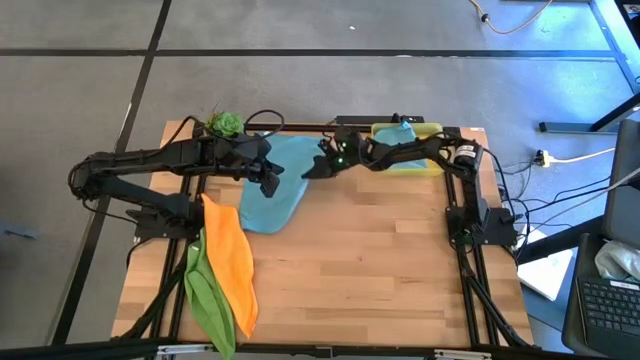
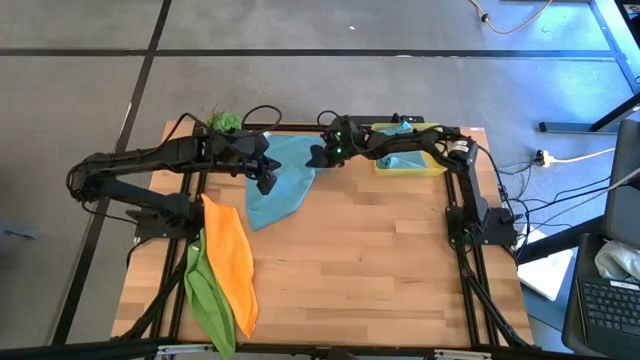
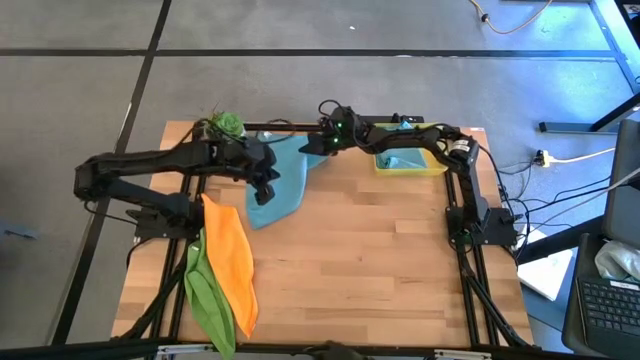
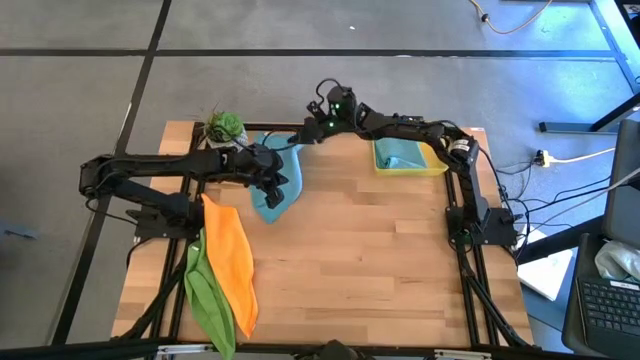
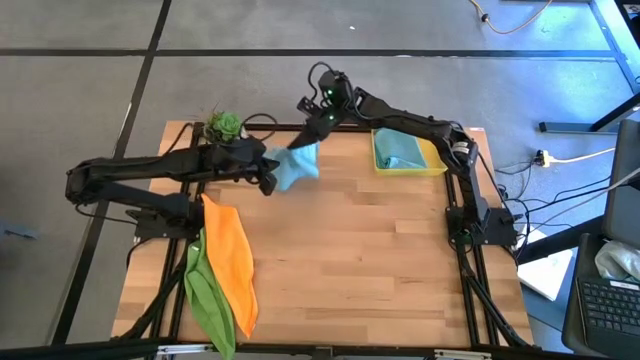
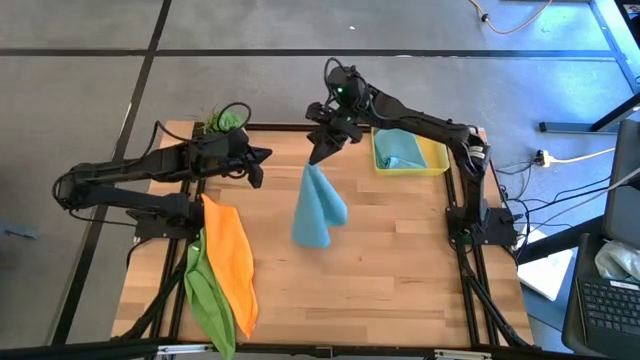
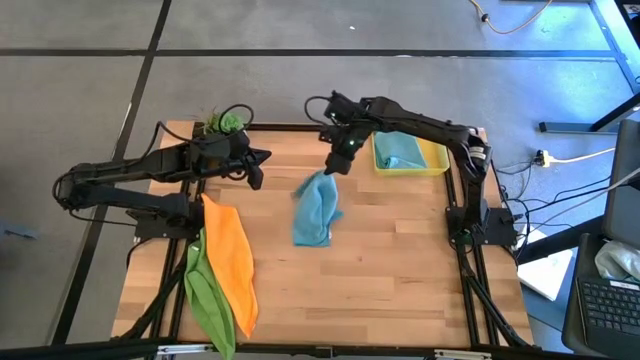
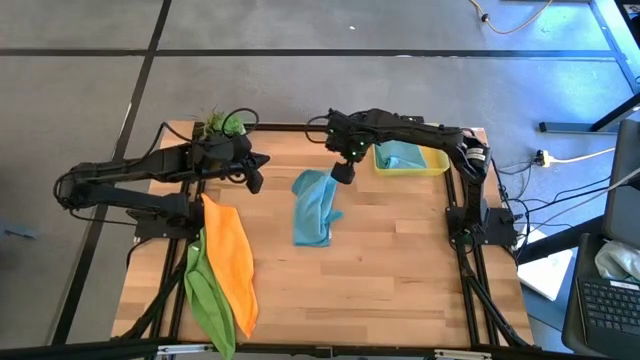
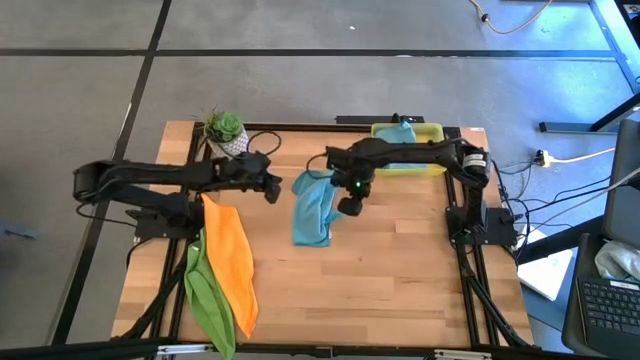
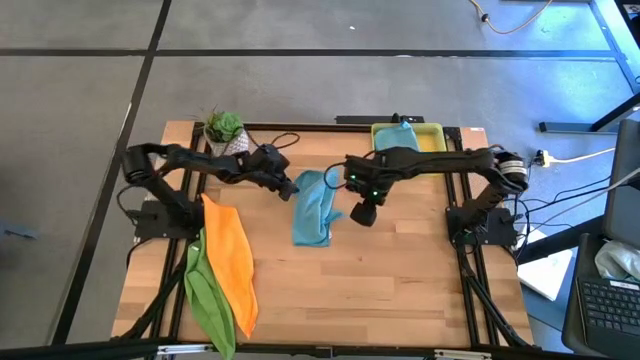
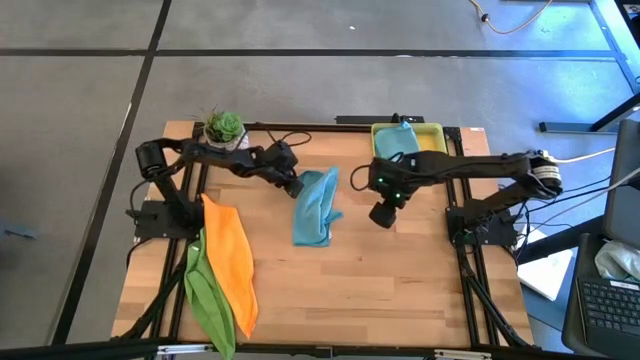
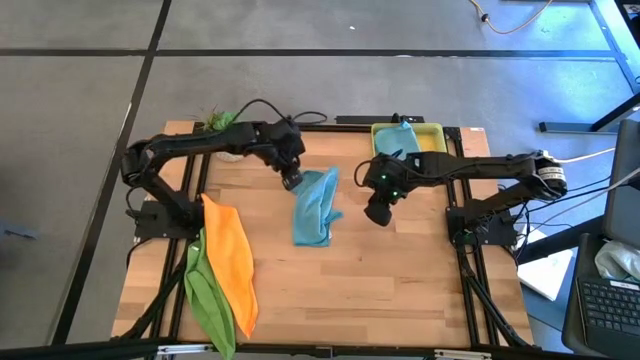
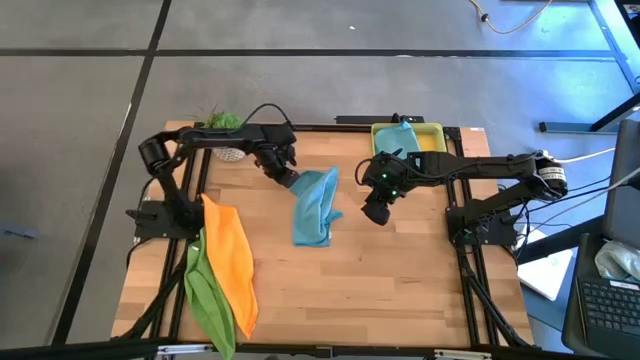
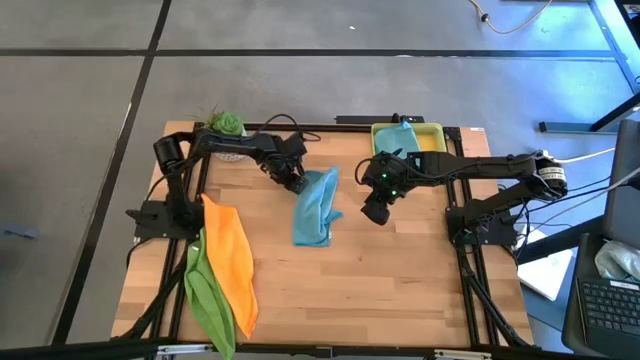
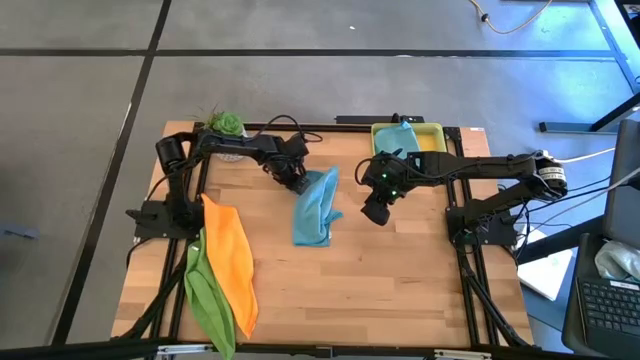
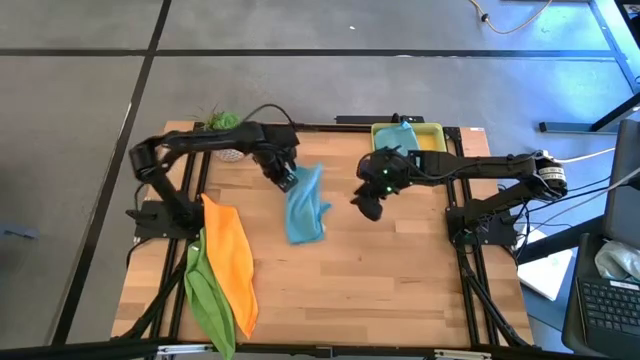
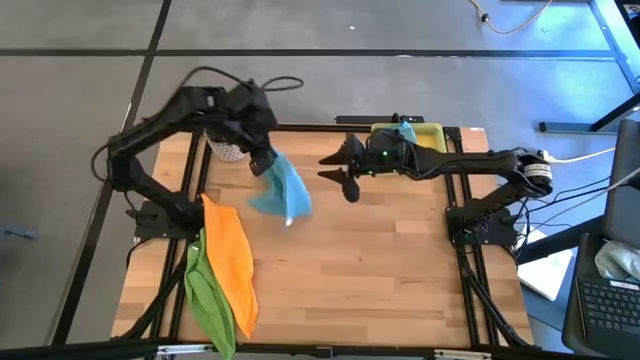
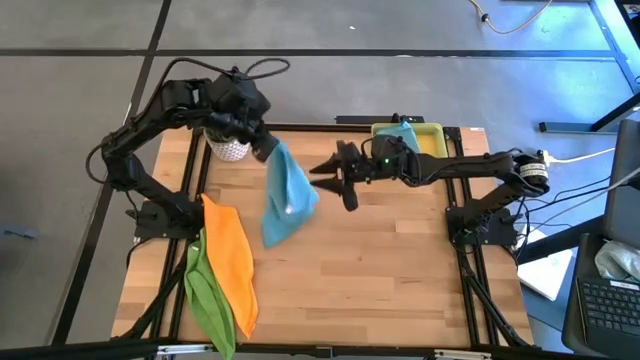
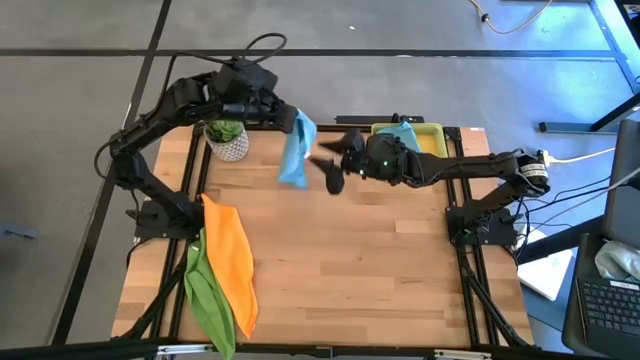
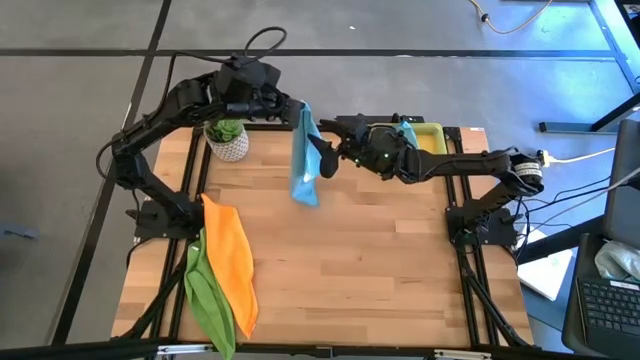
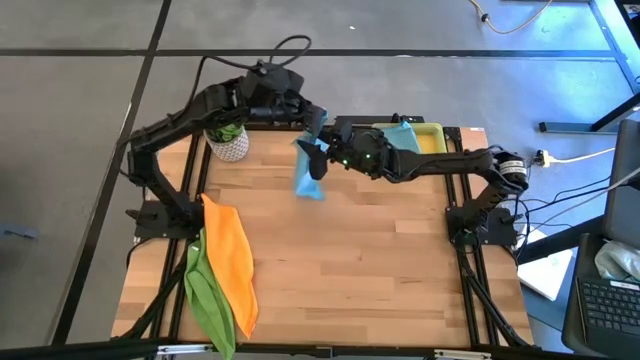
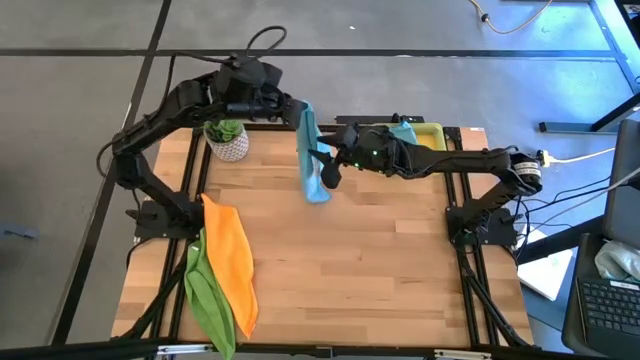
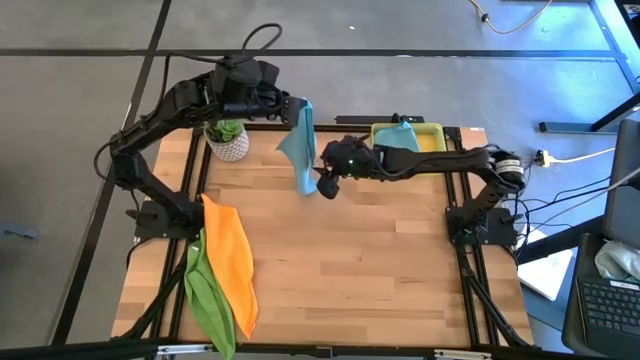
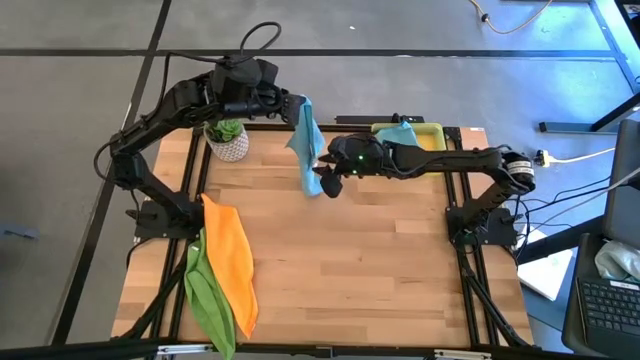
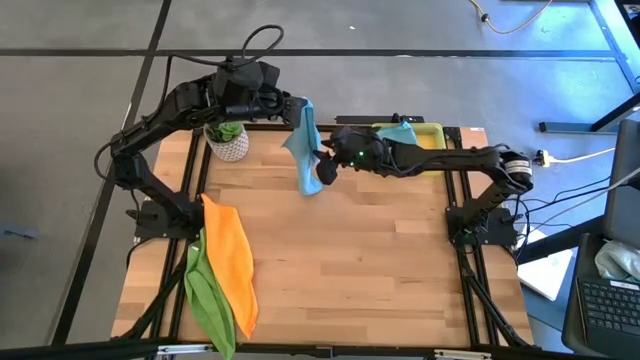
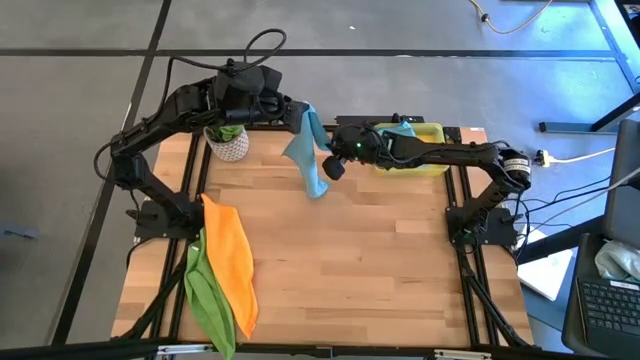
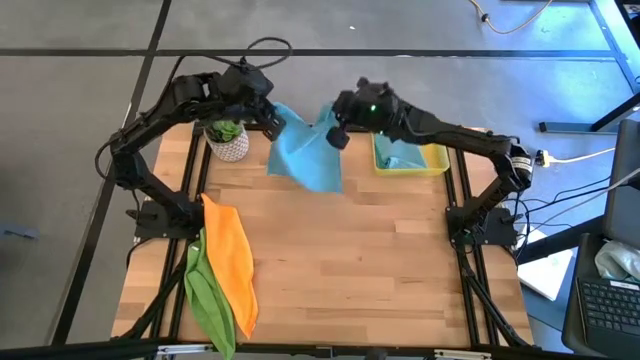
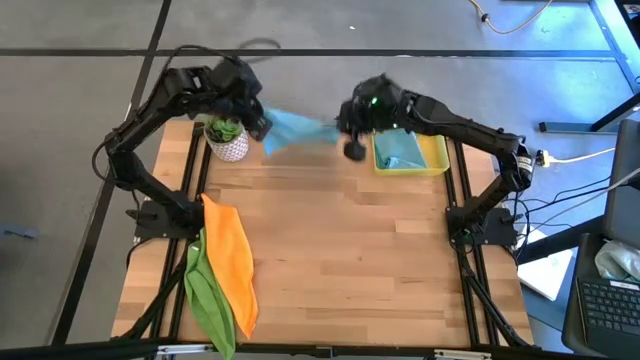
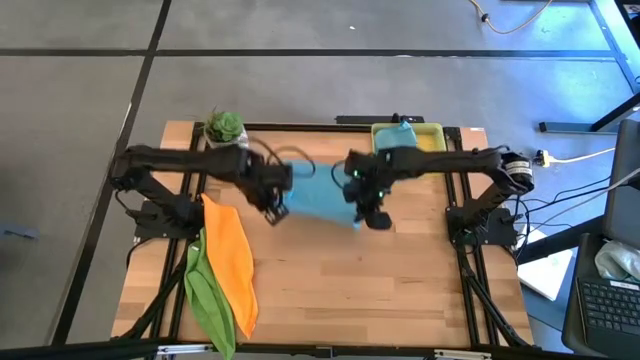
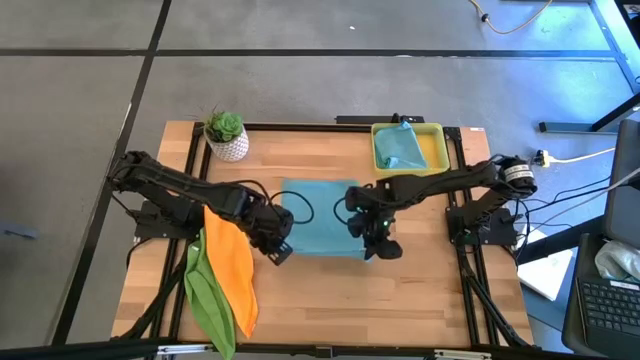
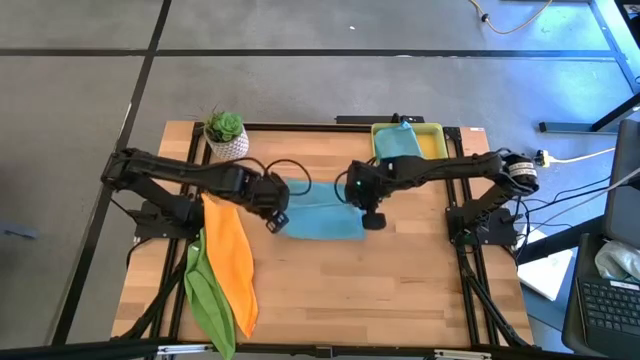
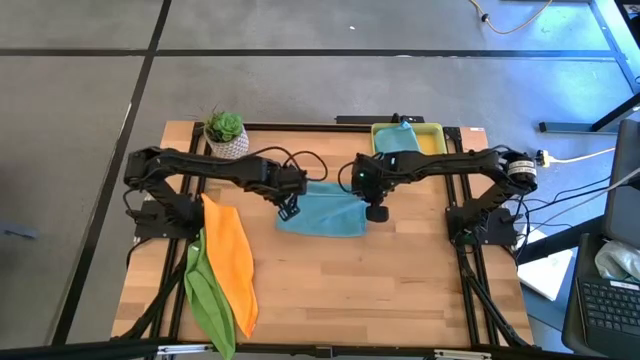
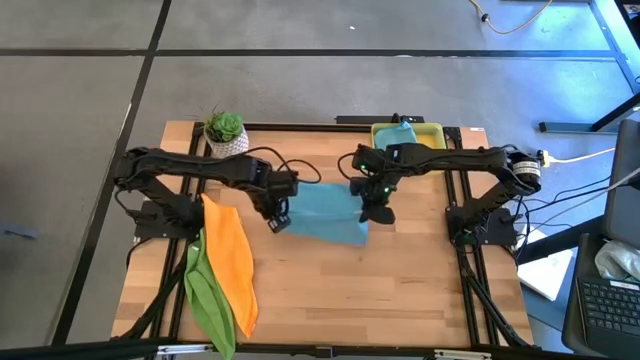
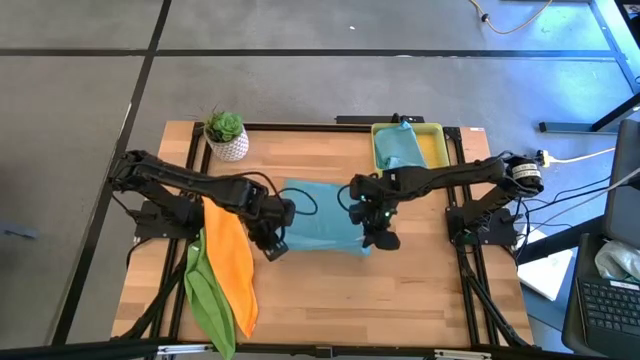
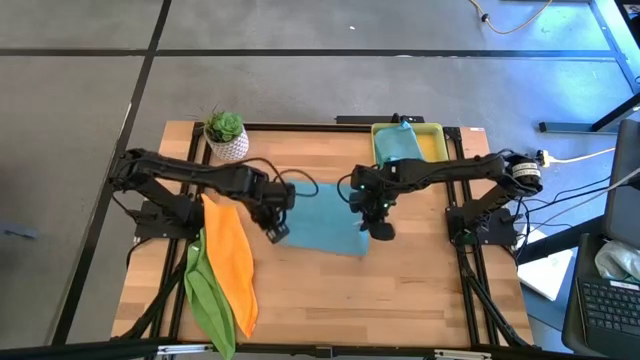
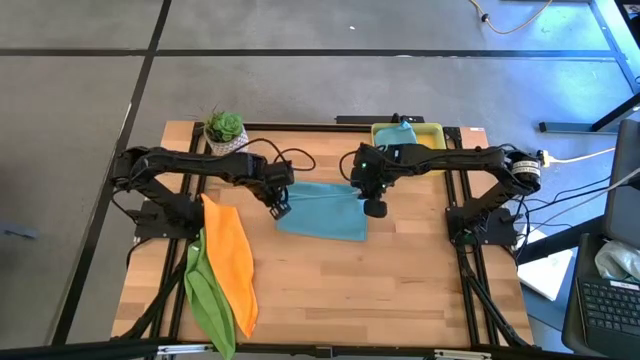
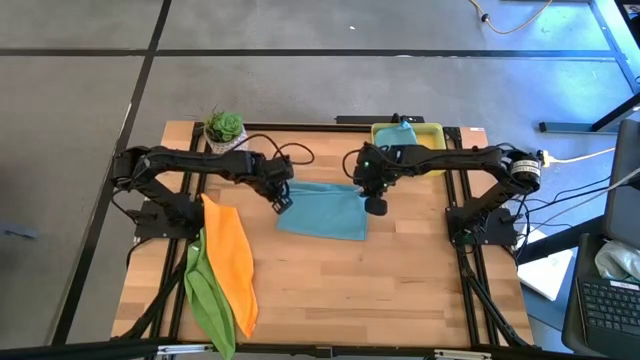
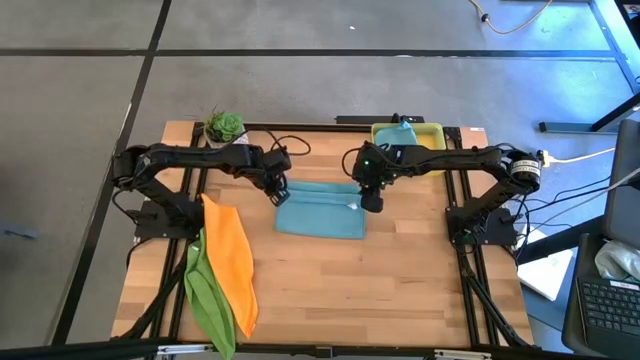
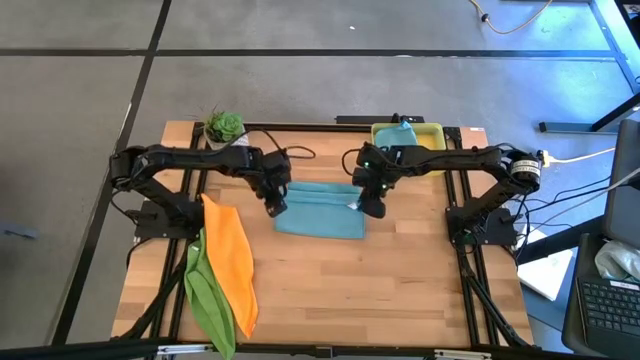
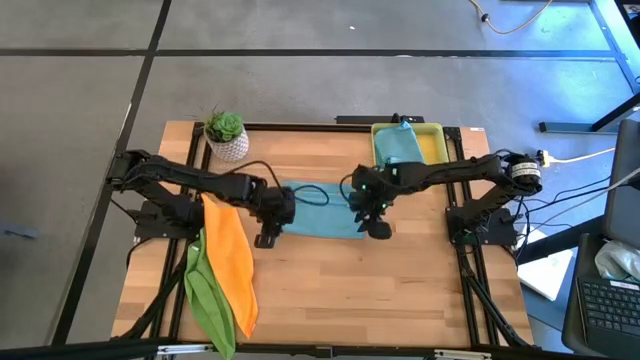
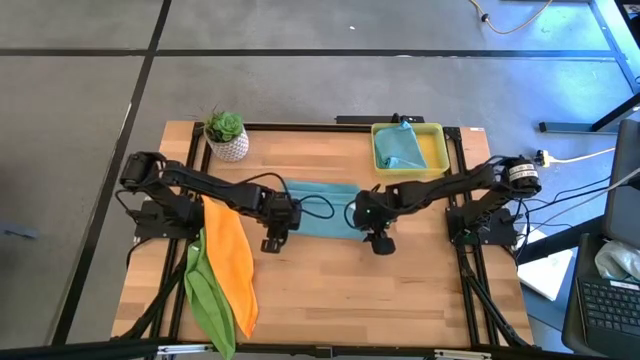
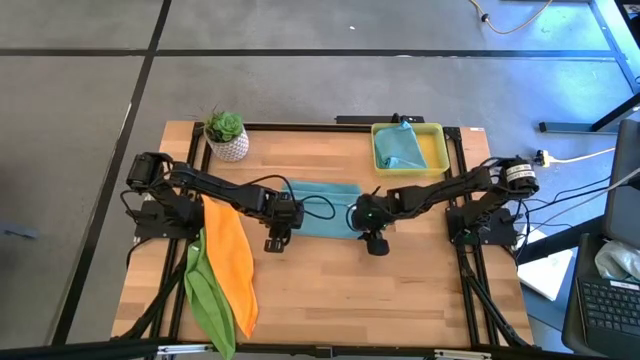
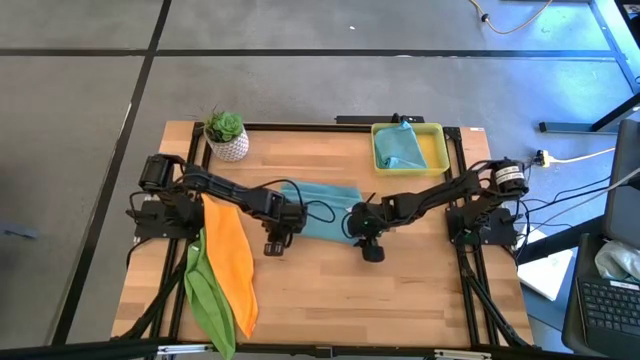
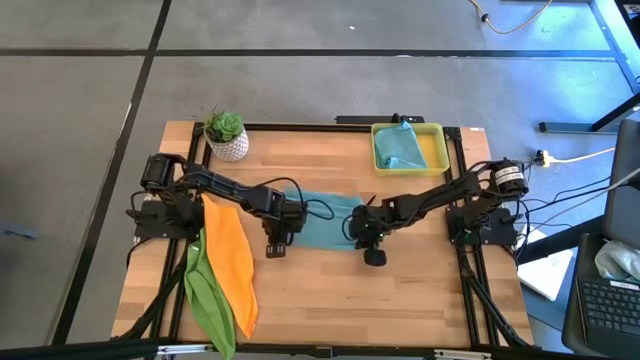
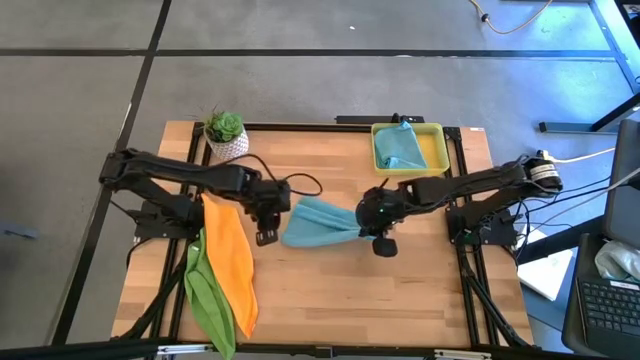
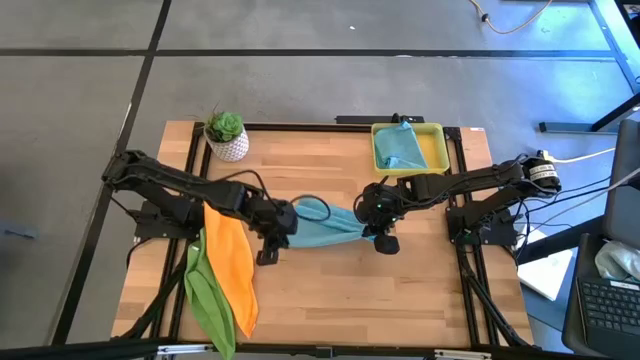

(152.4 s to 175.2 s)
Task: Fold microfiber towels
Fold the right blue microfiber towel
